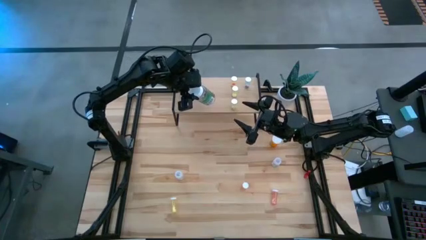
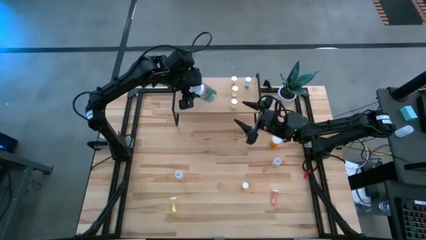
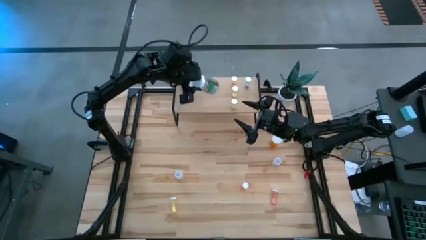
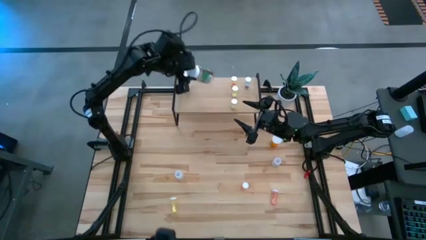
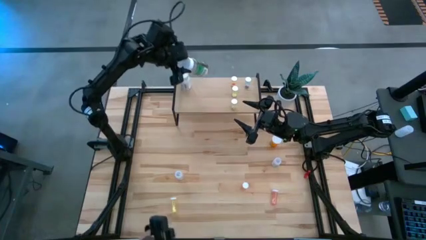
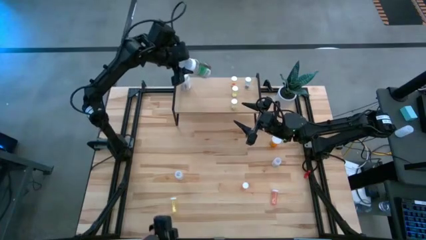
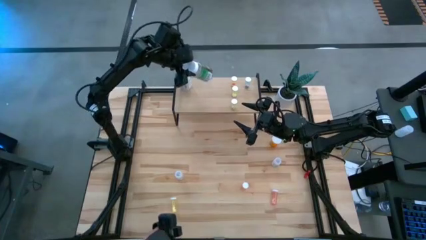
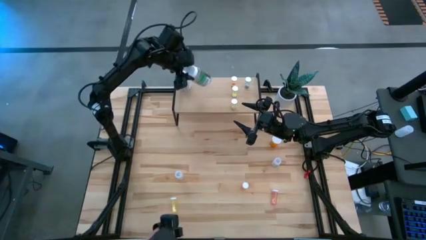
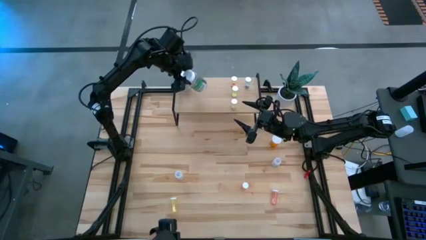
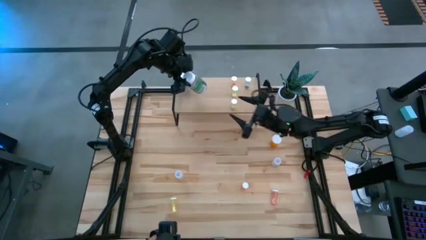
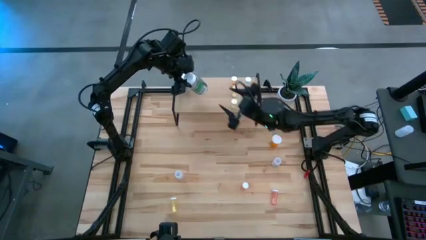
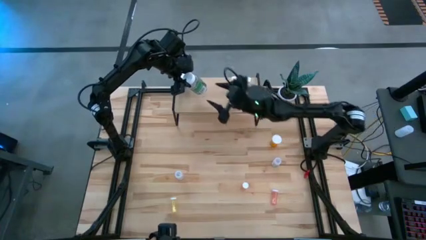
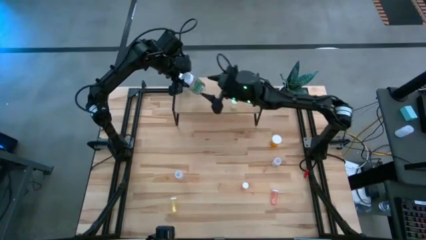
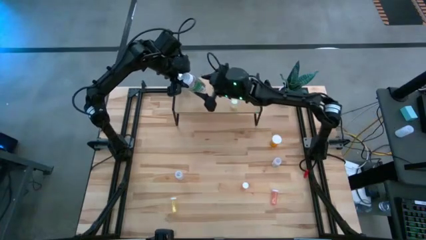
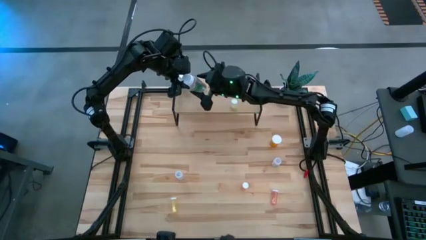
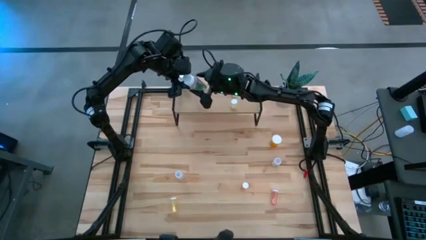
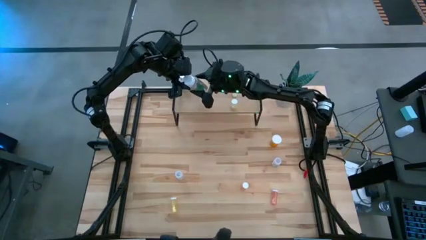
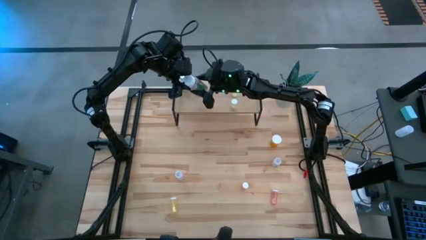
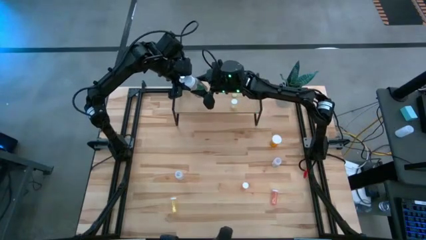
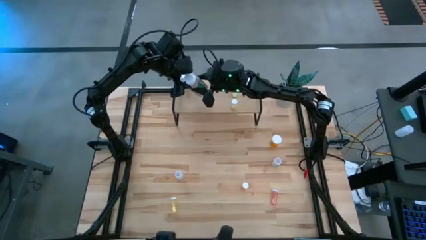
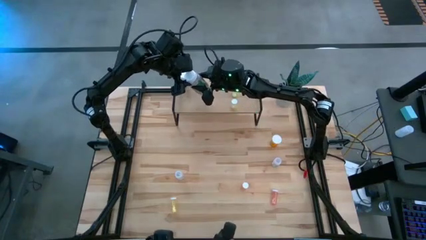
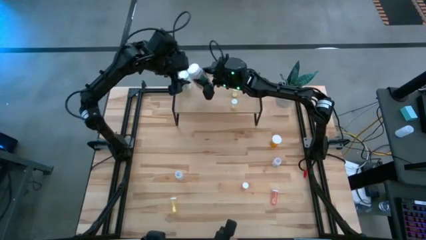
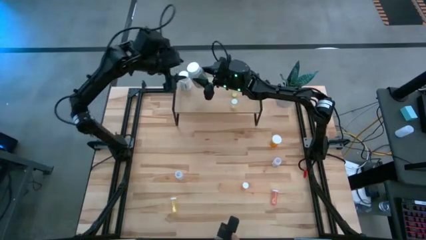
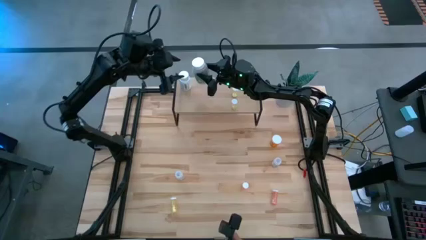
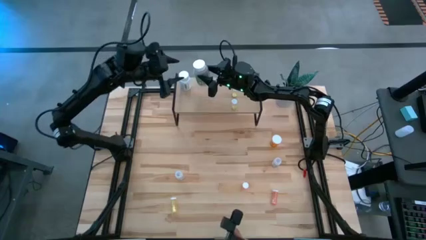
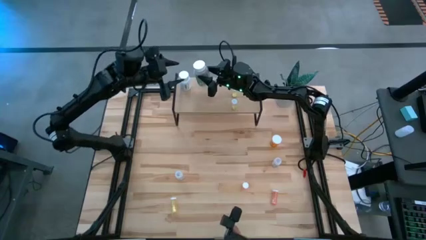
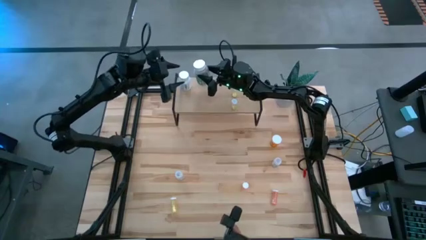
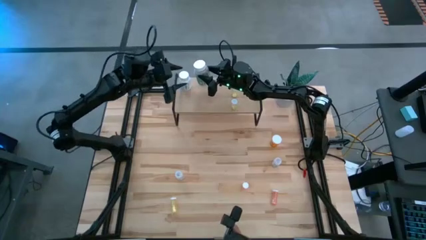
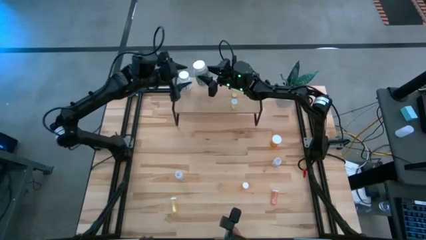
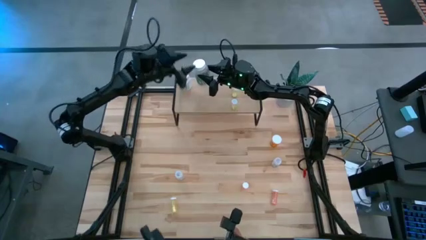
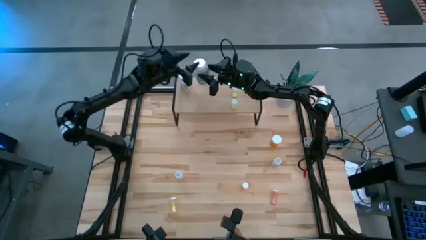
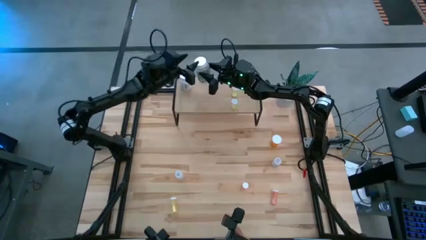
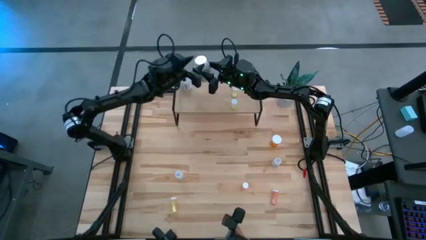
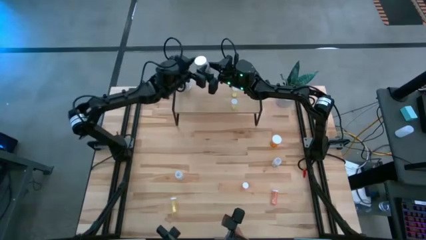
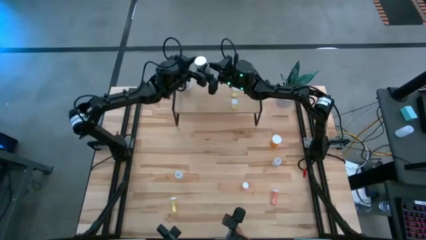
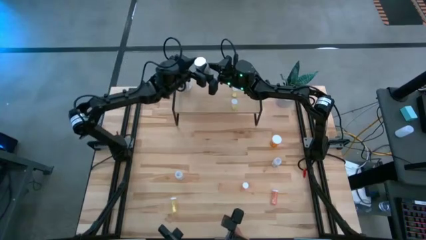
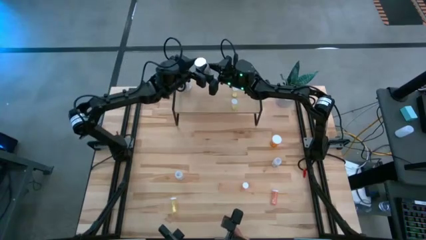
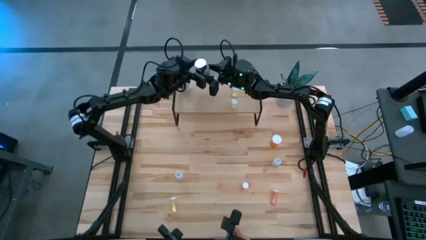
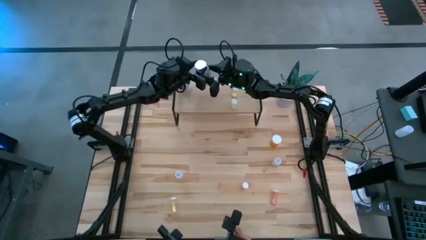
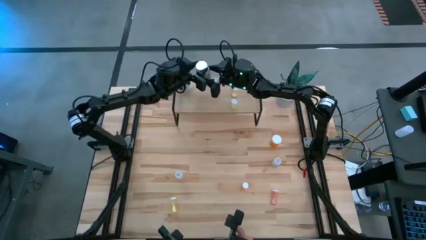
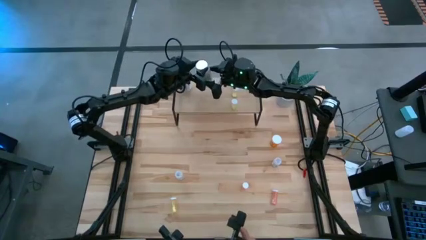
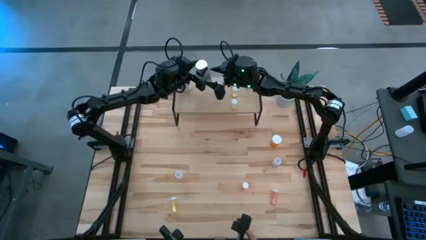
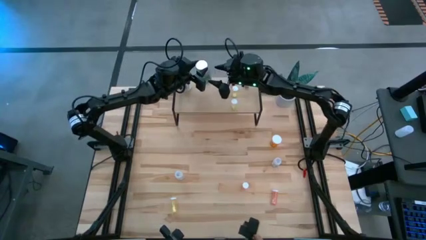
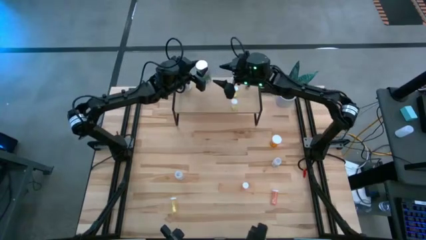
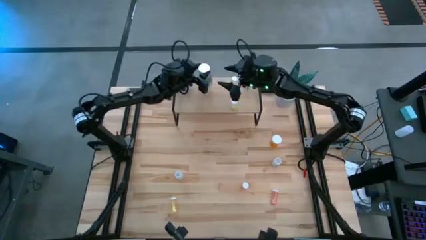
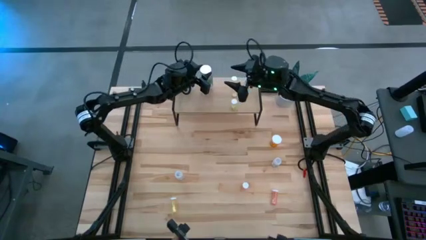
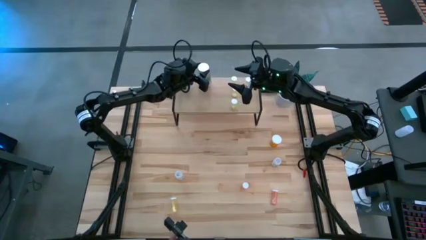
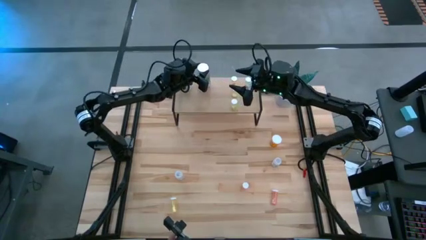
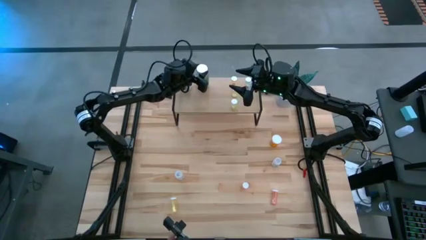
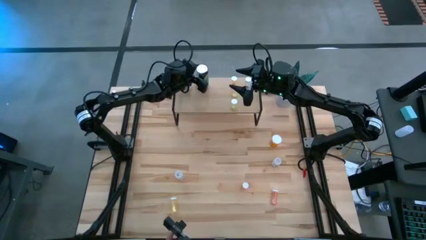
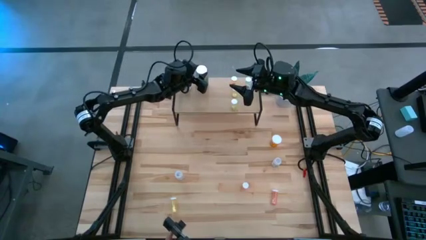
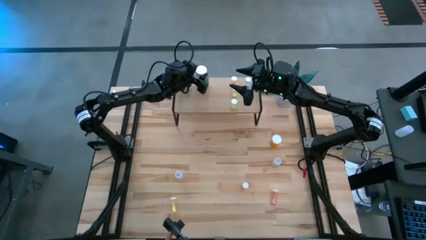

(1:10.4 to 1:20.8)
Task: Pick and place medicine bottles onto shelf by color
Put the white green pill bottle on the shelf

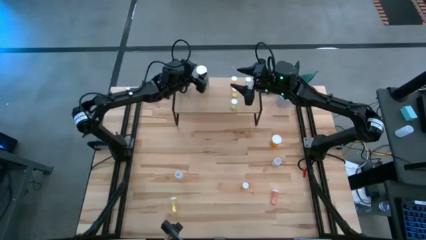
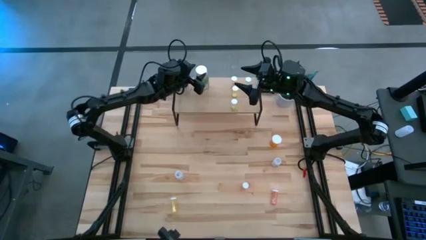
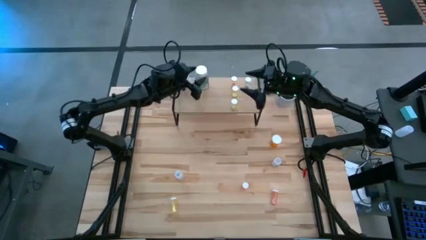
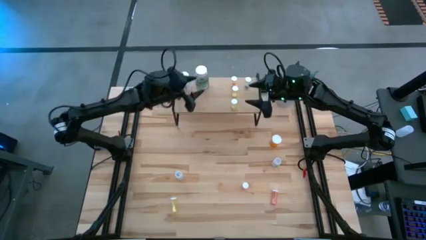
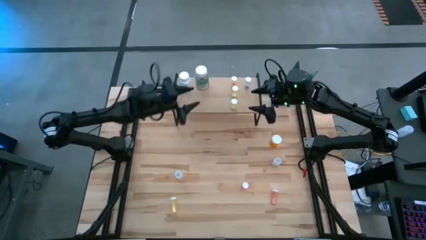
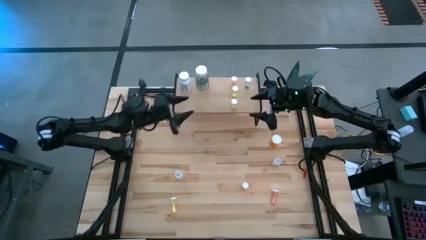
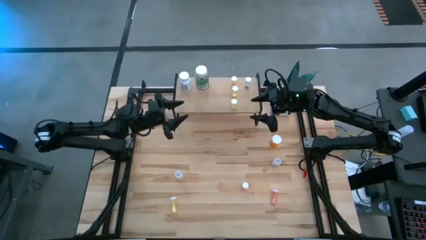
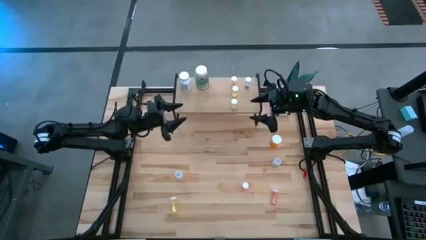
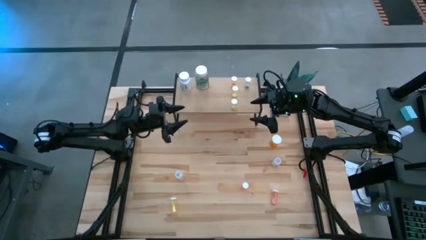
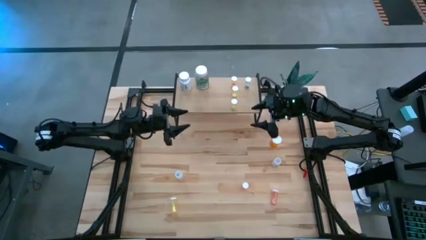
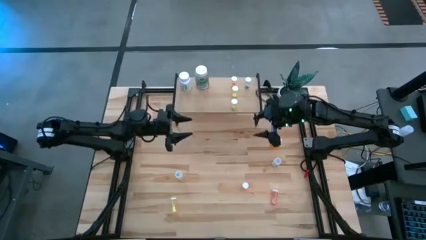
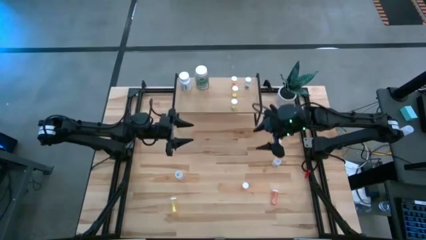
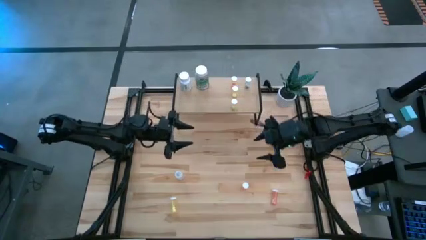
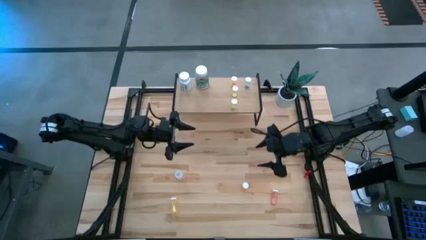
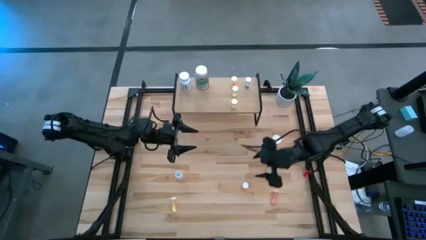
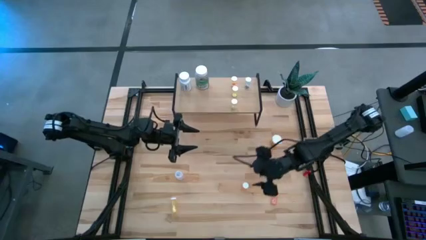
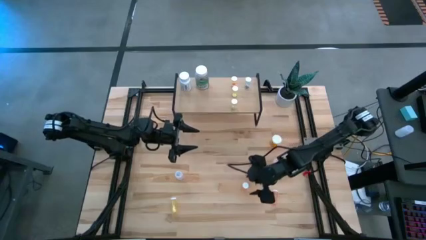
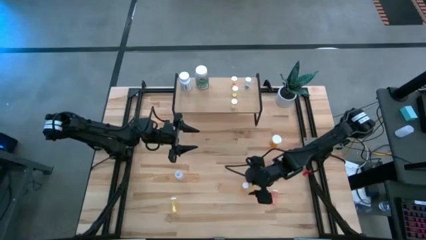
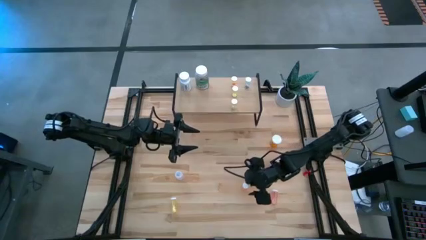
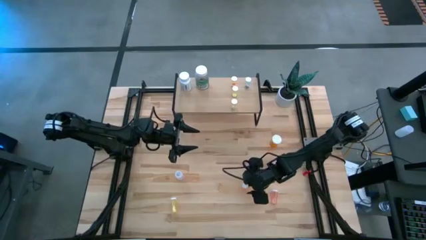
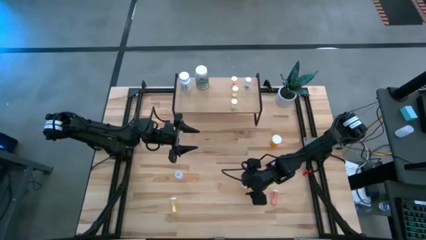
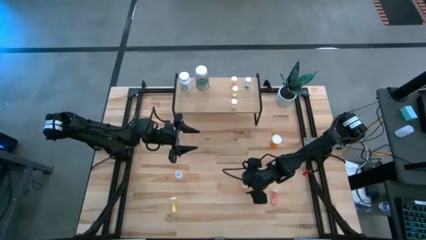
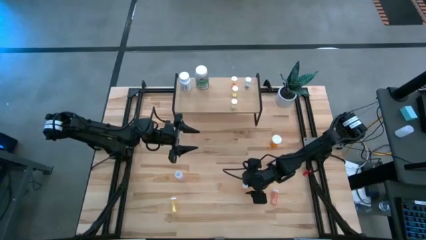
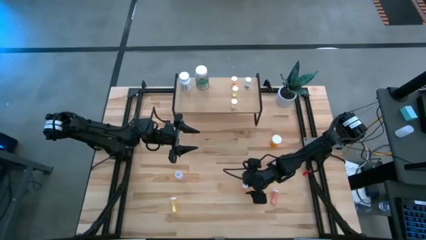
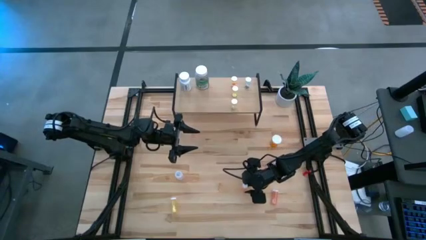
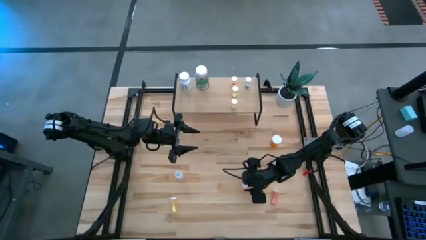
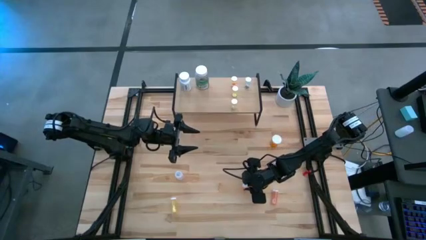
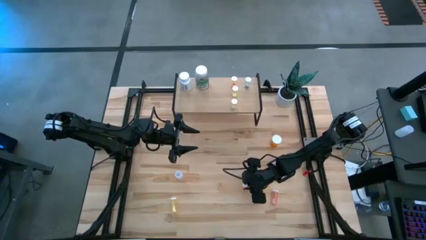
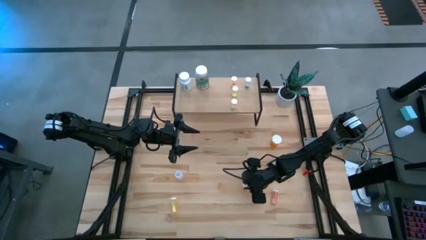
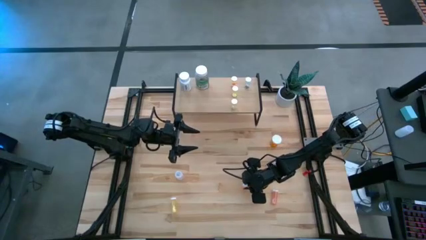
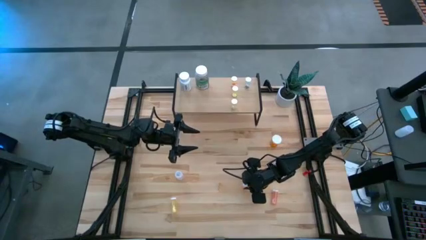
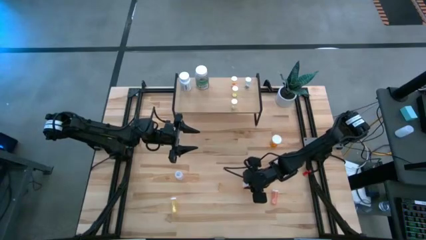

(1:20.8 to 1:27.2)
Put the right pink pill bottle on the shelf
